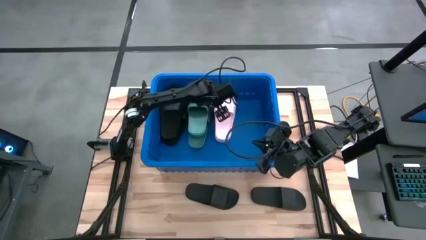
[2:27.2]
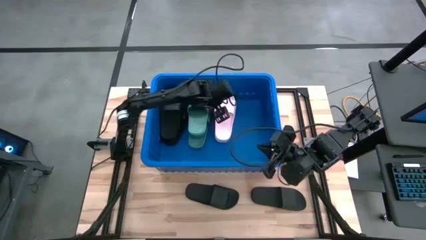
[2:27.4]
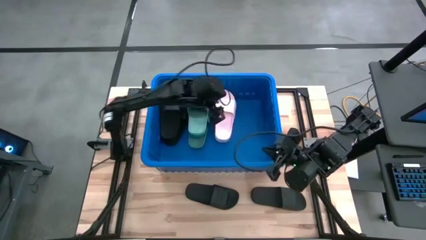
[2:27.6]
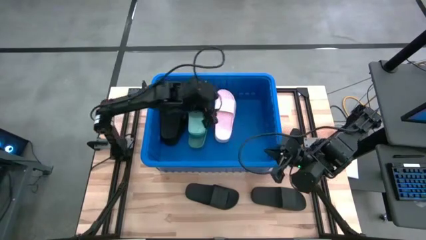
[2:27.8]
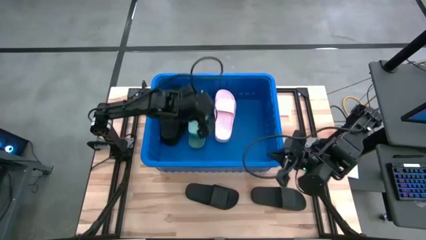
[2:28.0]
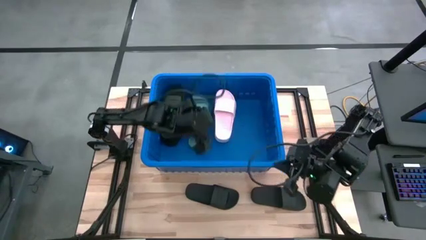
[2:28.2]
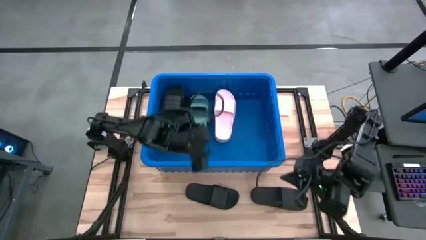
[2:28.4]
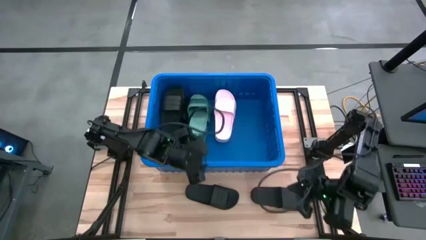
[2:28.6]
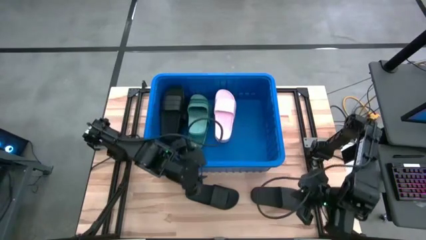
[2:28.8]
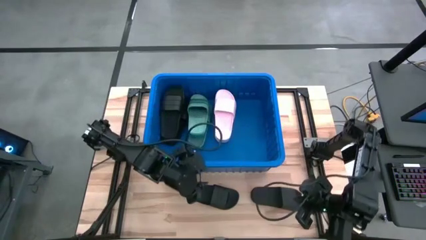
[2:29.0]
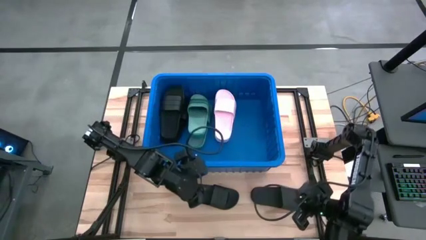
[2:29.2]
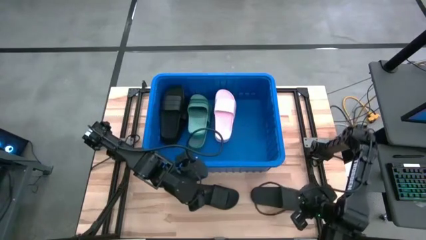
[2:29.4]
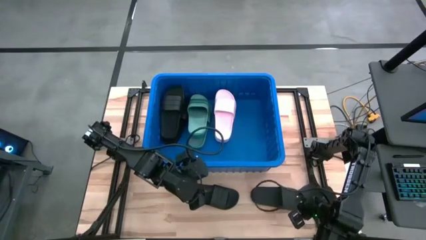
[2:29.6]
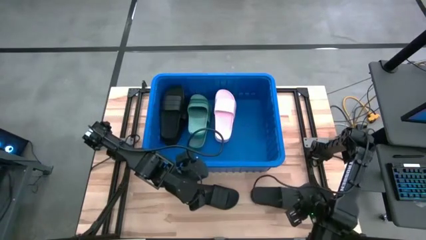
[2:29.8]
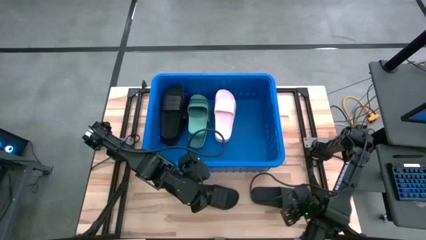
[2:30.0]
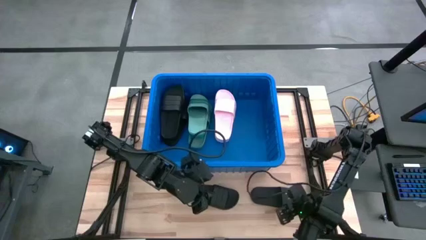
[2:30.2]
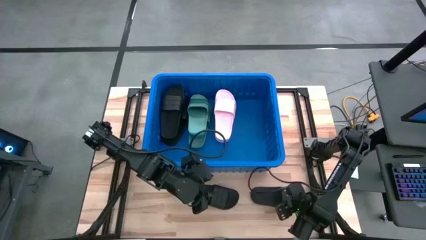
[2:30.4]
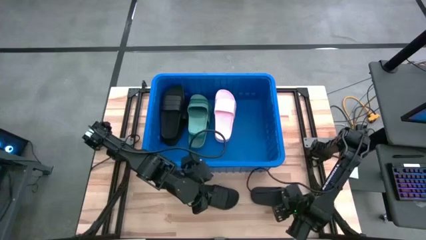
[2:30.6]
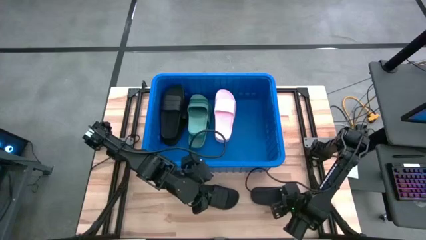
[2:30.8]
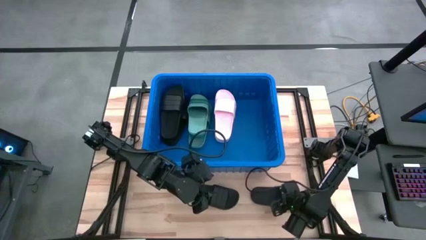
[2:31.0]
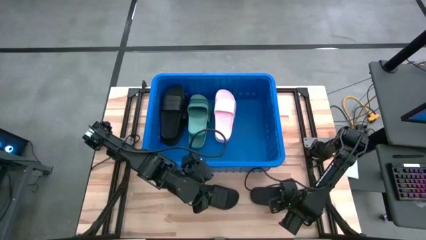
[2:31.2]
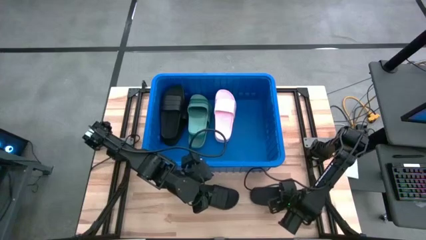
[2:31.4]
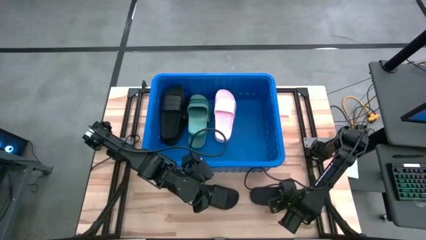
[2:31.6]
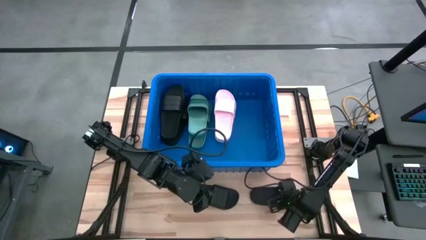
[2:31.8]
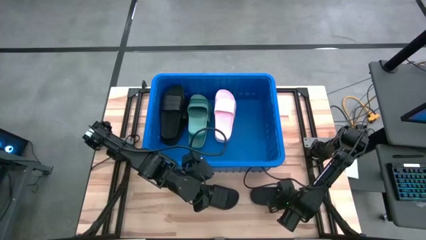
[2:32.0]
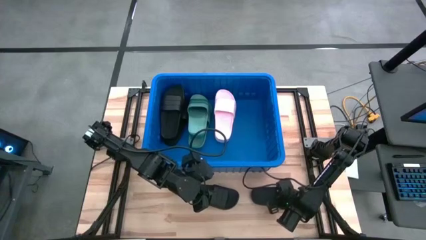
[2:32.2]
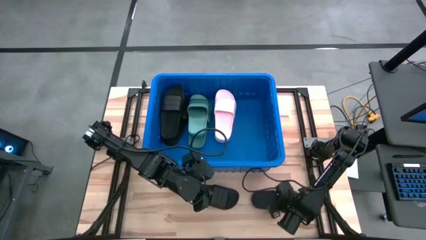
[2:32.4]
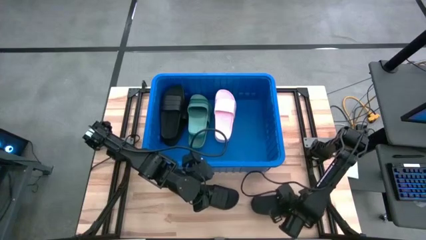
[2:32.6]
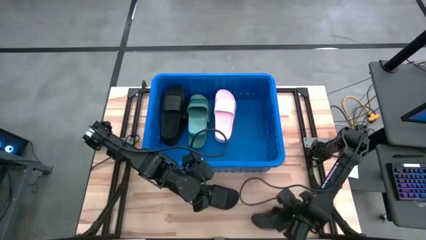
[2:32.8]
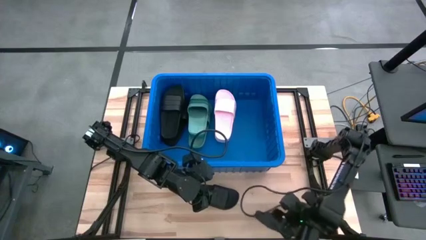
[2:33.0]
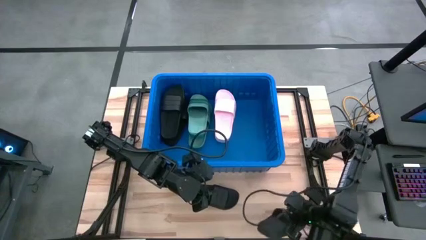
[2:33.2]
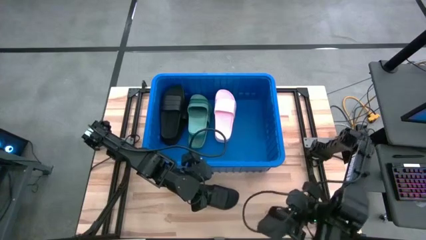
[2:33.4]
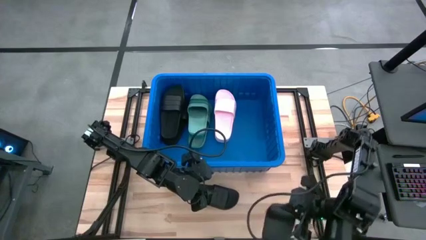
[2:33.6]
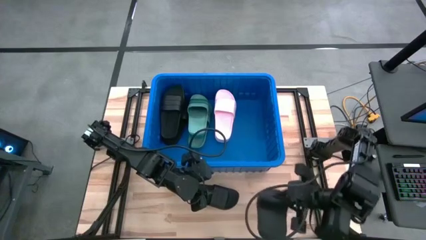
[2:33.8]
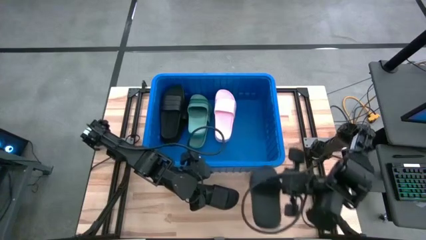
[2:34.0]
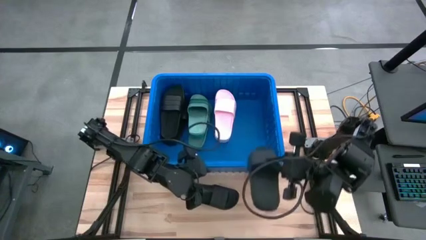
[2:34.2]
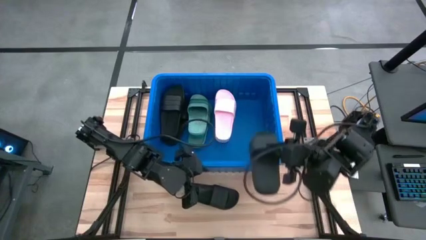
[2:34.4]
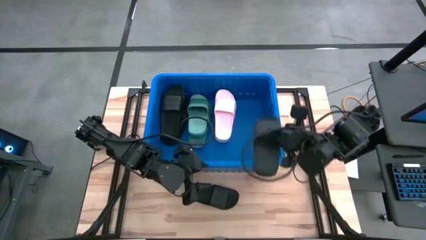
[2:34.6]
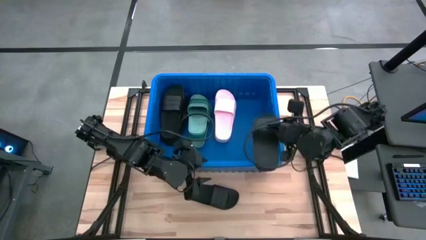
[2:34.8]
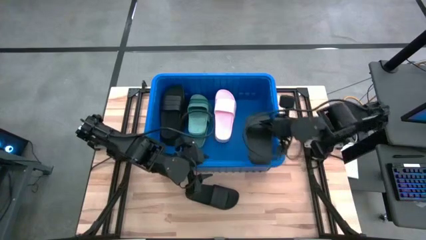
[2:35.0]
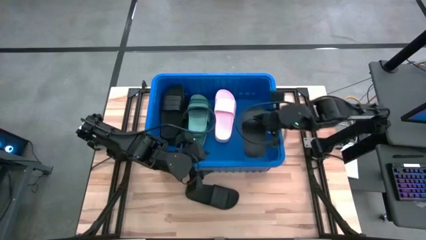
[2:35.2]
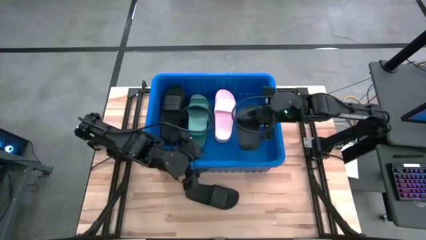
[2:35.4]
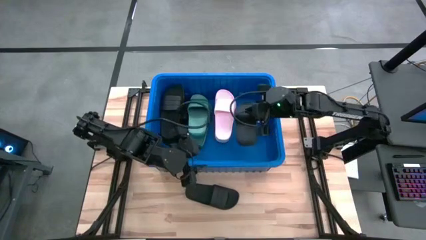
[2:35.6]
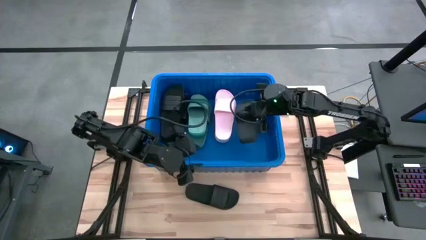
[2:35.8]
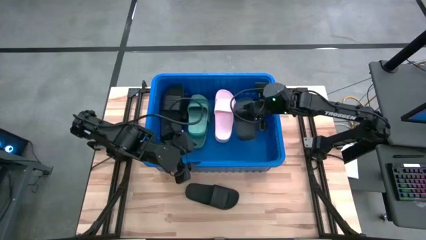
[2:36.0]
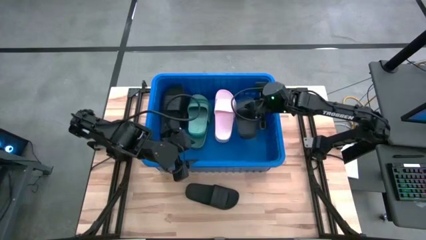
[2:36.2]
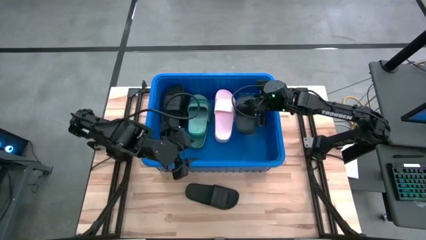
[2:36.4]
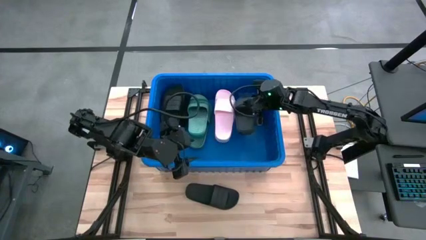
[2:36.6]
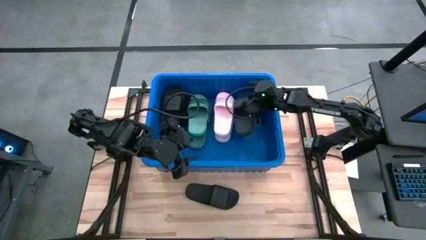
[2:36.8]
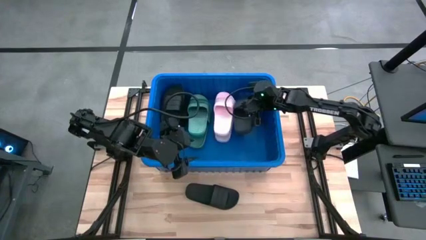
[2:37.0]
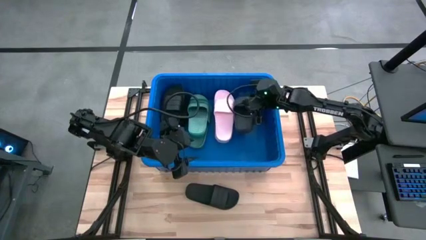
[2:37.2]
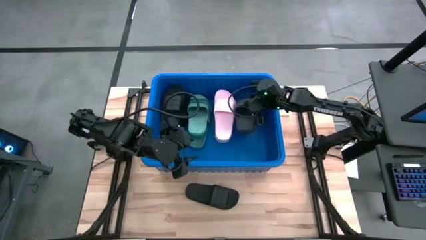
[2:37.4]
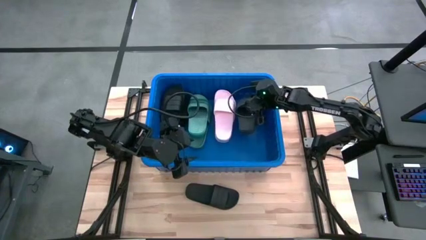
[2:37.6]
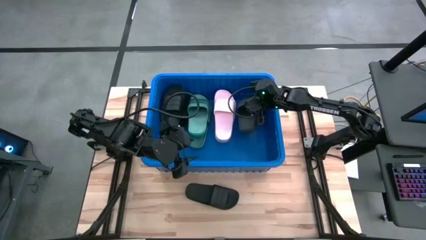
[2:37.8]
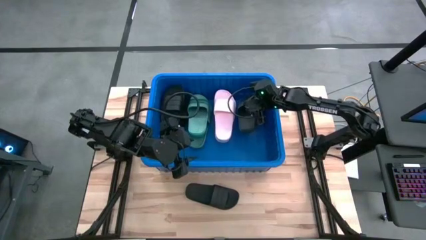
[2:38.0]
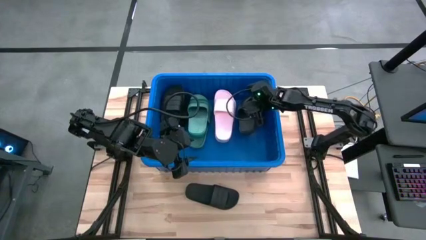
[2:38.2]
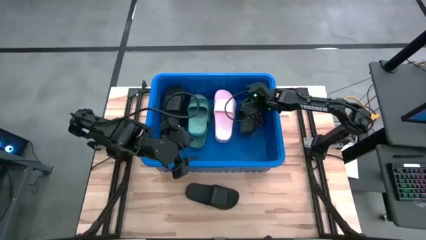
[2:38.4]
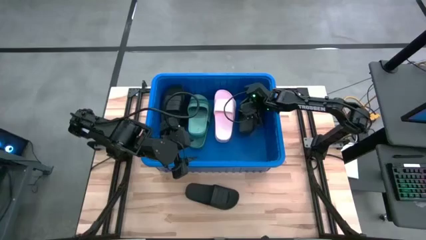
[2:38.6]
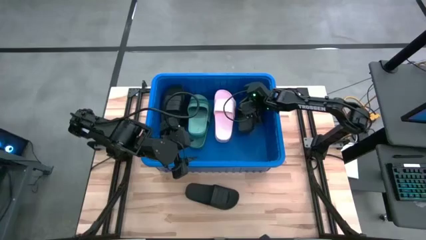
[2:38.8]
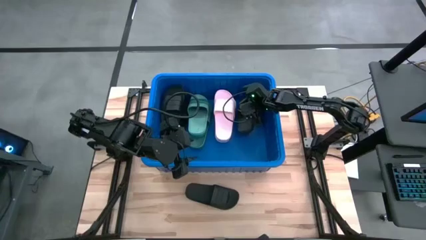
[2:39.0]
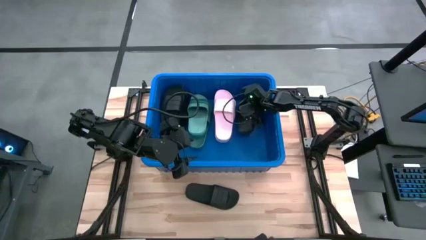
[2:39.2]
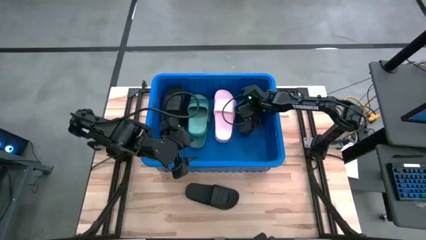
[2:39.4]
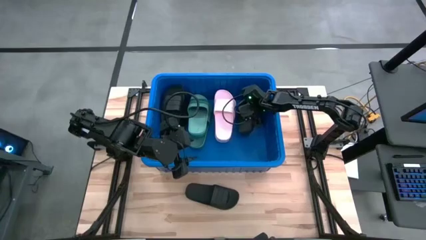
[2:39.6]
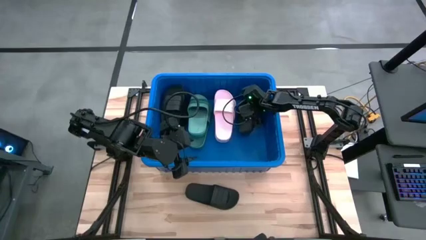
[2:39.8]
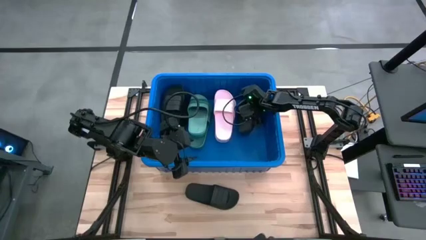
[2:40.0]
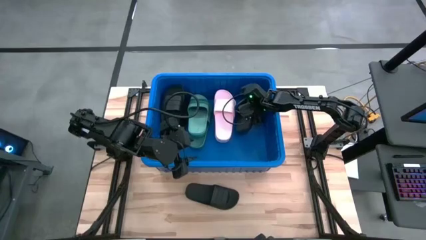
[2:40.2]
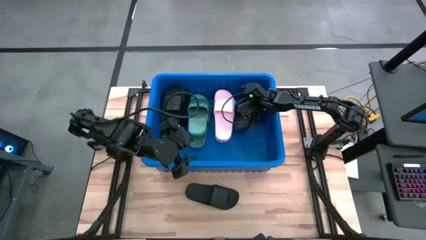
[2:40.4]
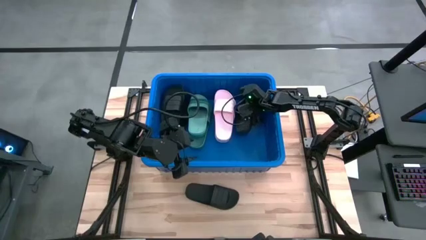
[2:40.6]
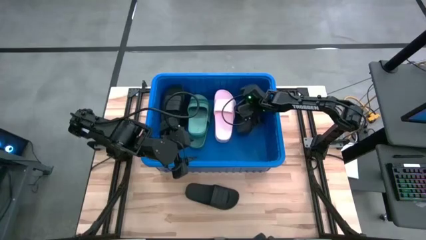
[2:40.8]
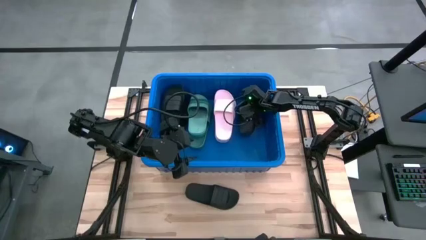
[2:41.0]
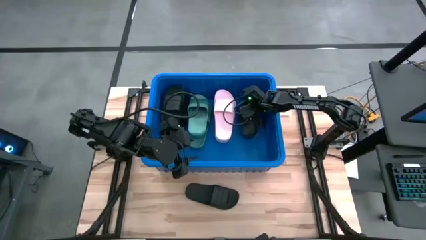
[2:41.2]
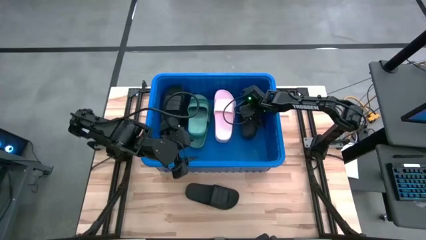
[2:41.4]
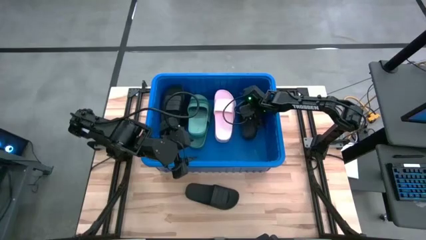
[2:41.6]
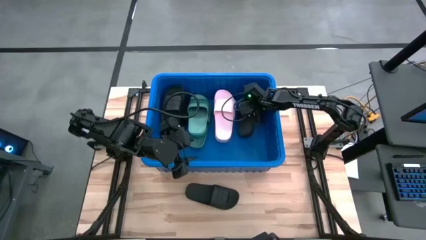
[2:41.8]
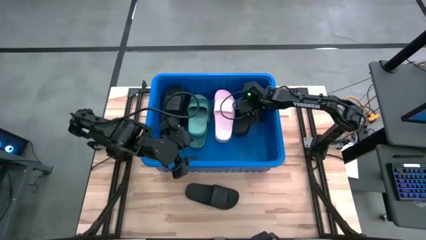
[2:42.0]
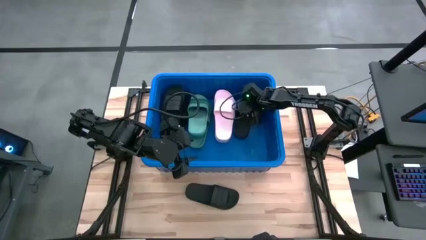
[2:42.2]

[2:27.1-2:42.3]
Task: Pick and place slides into bin
Put the black slipper into the blue bin

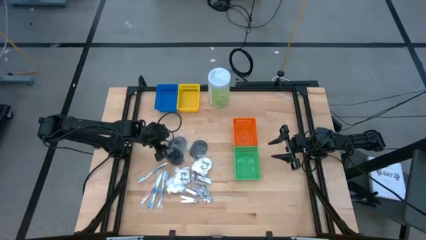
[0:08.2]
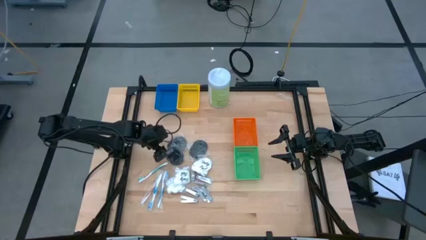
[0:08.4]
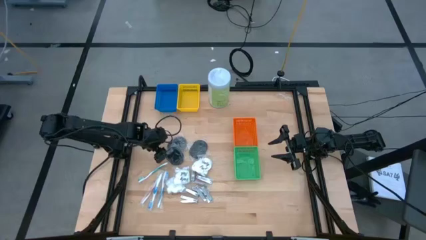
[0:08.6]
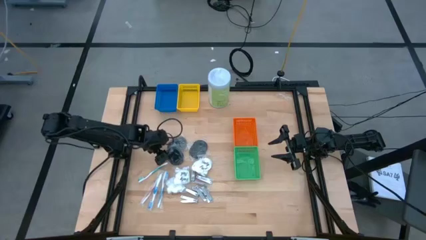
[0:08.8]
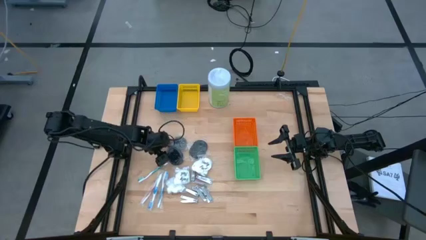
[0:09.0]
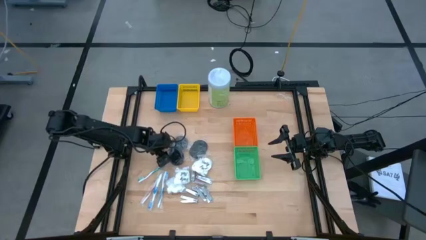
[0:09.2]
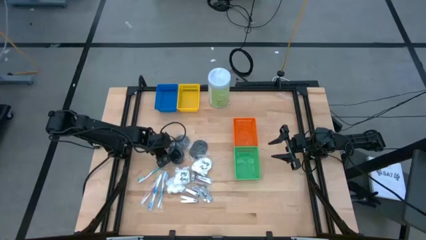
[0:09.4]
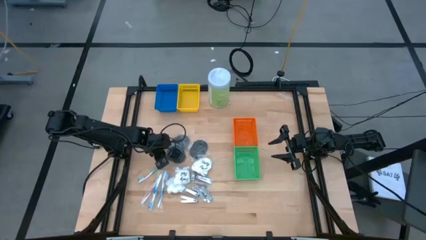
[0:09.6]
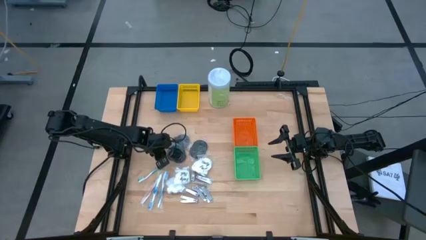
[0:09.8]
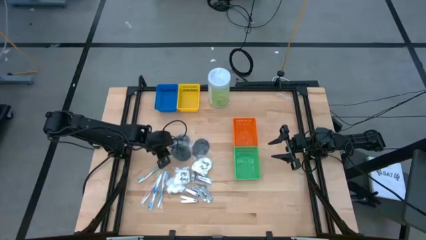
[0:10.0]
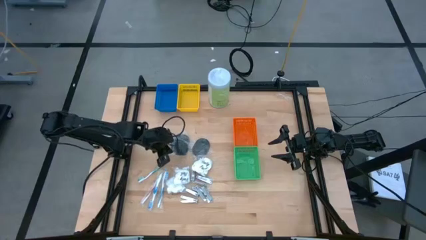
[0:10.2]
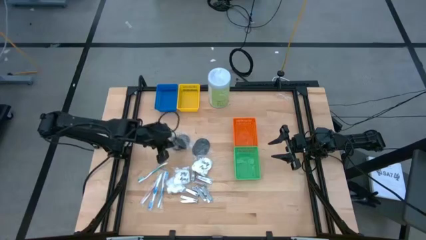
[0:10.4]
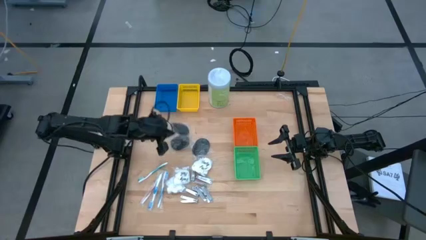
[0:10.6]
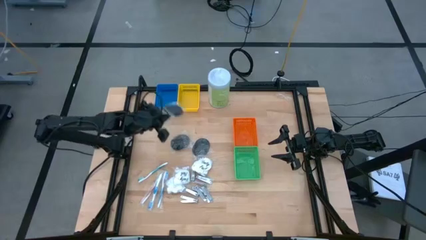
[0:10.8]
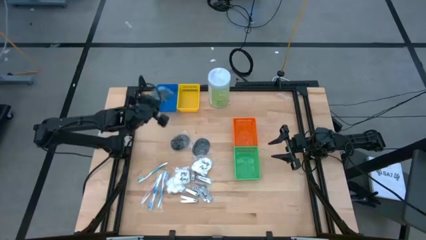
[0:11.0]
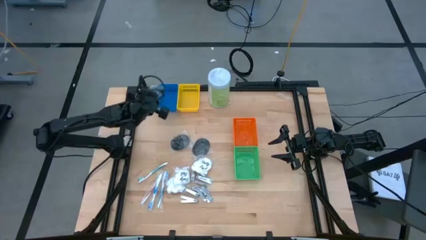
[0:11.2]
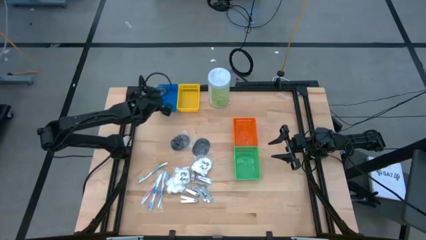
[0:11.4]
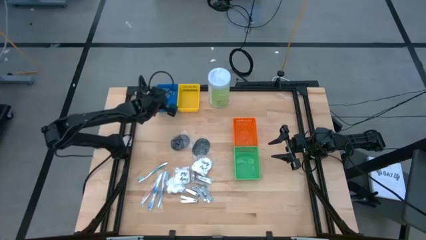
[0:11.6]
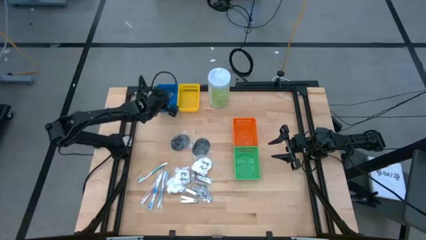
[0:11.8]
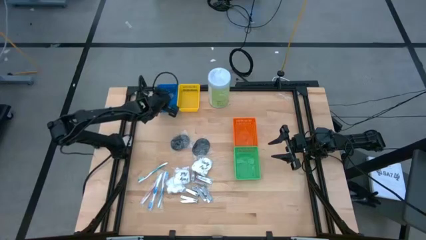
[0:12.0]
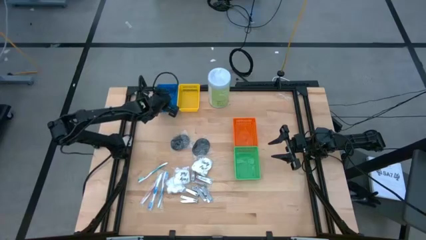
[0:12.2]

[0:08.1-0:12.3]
Task: Pick & Place Travel size toiletries
Put the black hairbrush into the blue bin
